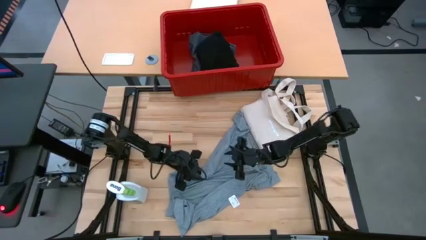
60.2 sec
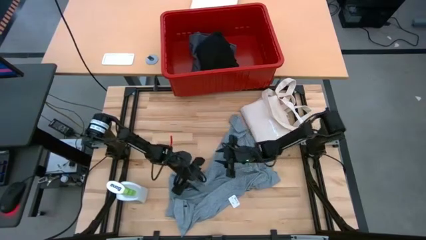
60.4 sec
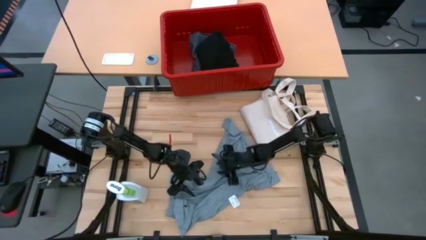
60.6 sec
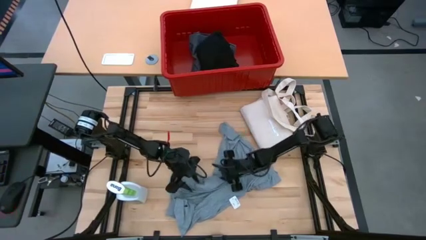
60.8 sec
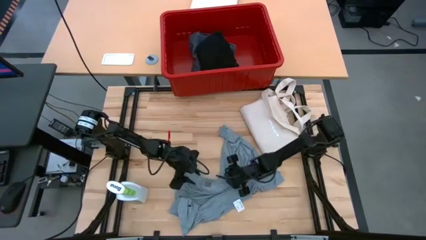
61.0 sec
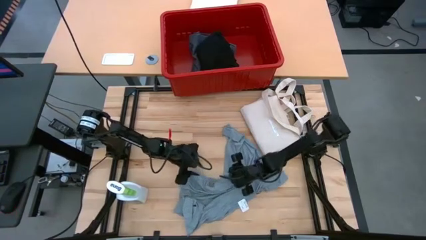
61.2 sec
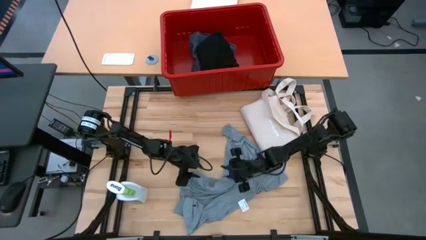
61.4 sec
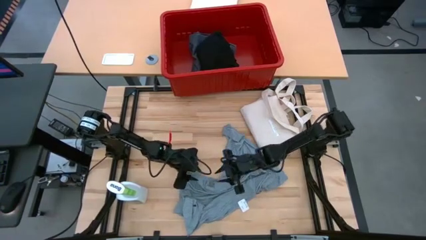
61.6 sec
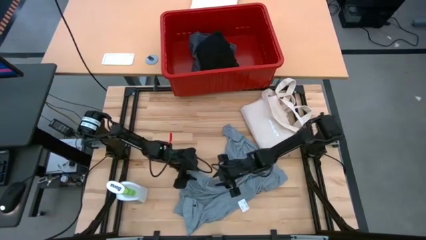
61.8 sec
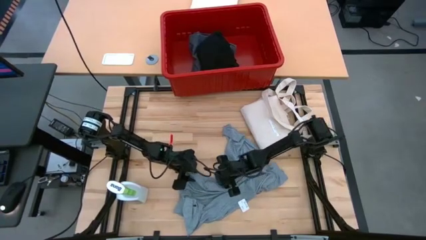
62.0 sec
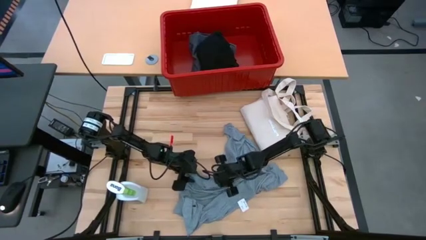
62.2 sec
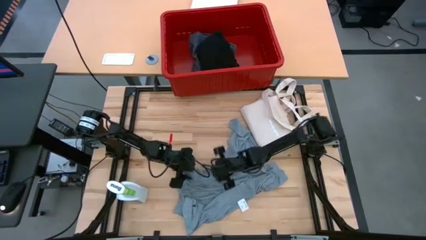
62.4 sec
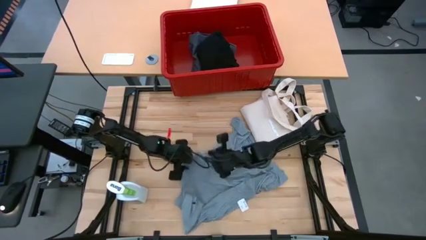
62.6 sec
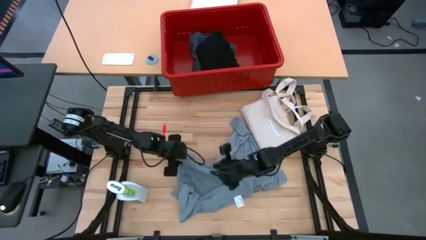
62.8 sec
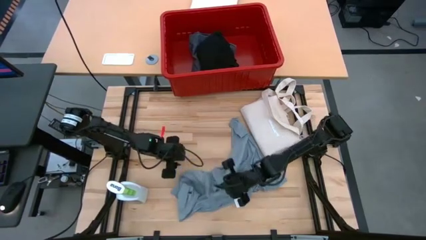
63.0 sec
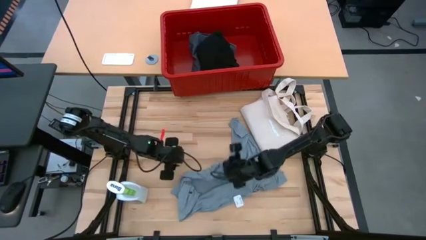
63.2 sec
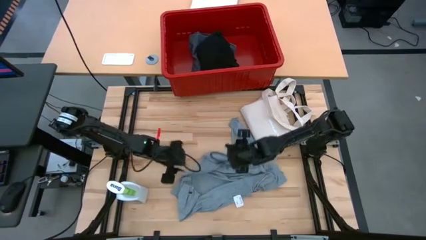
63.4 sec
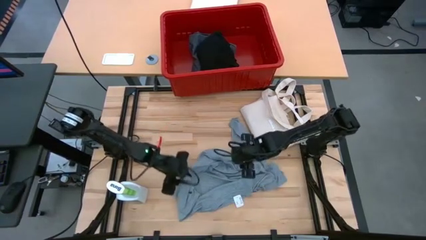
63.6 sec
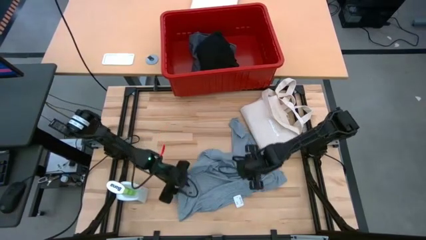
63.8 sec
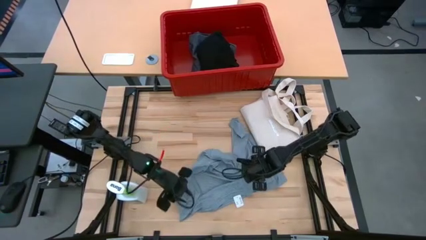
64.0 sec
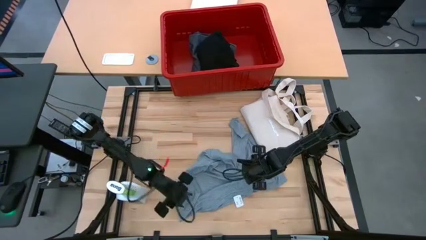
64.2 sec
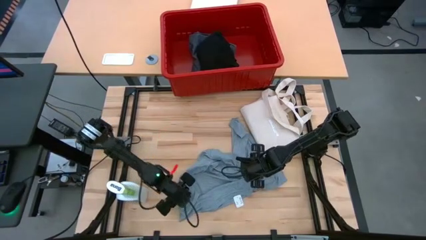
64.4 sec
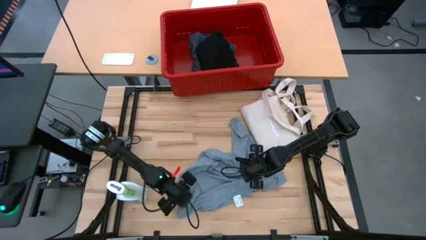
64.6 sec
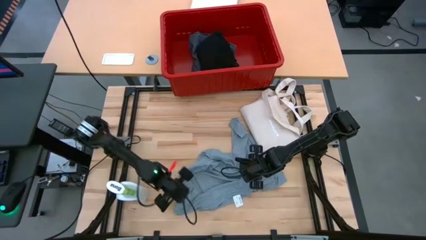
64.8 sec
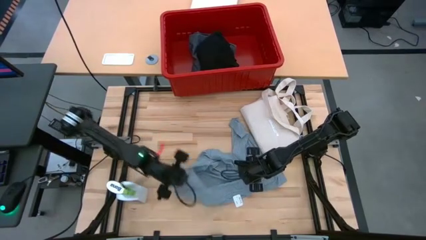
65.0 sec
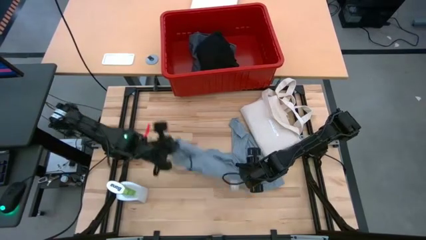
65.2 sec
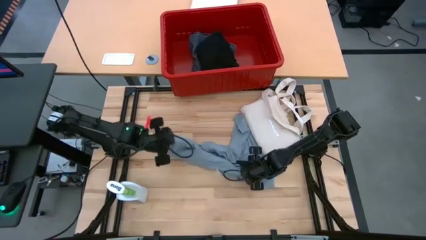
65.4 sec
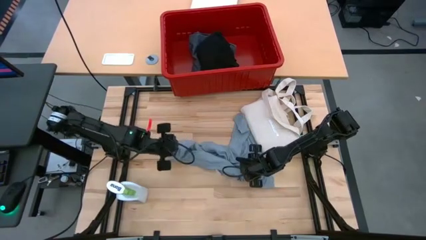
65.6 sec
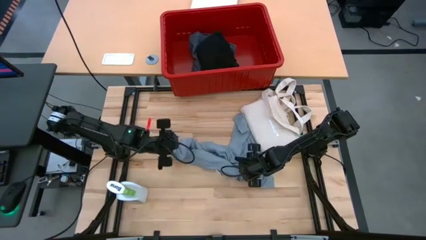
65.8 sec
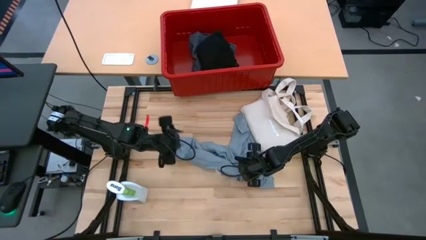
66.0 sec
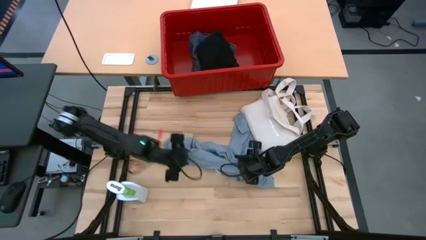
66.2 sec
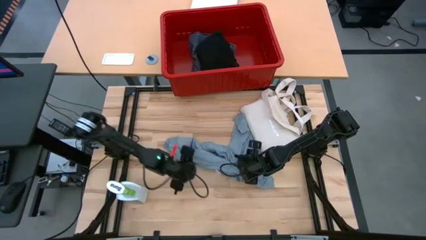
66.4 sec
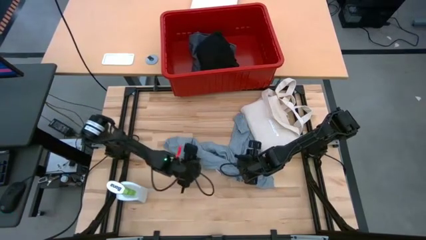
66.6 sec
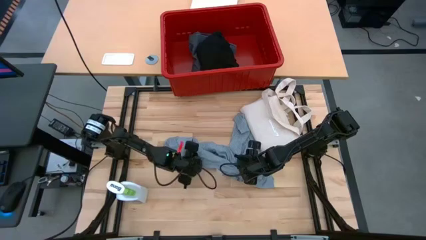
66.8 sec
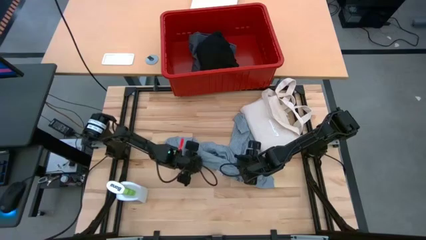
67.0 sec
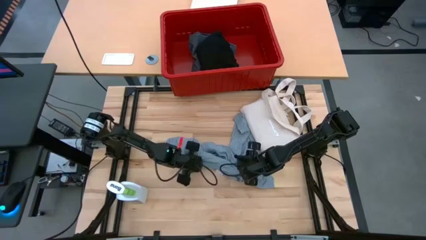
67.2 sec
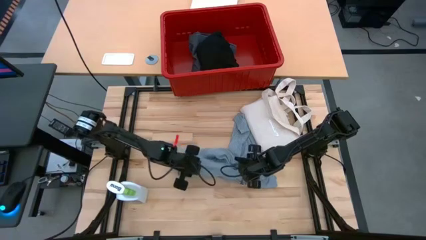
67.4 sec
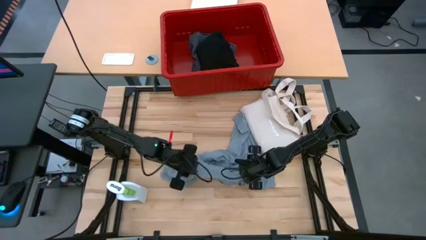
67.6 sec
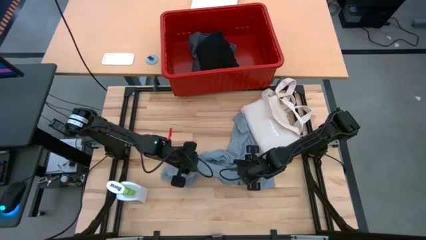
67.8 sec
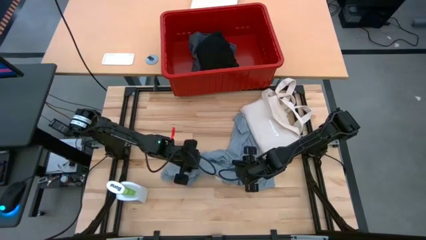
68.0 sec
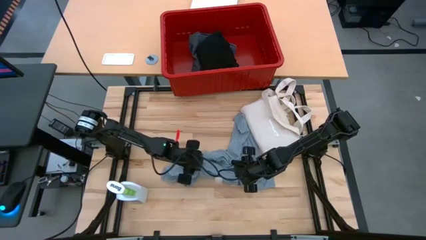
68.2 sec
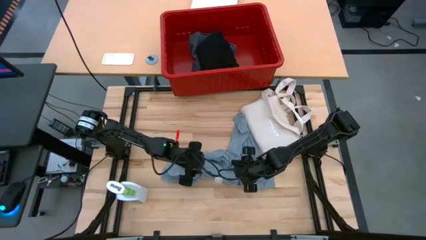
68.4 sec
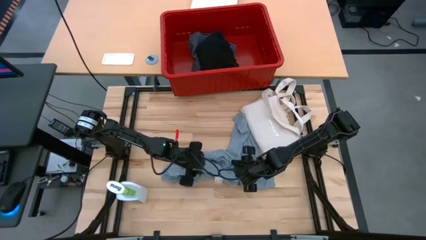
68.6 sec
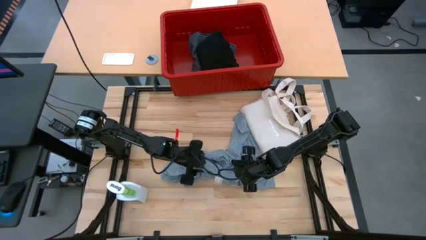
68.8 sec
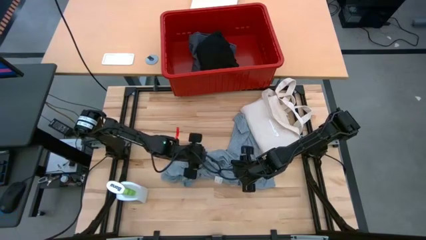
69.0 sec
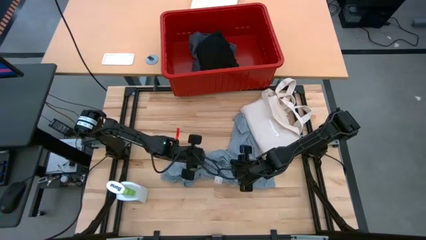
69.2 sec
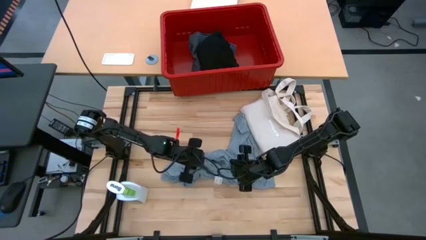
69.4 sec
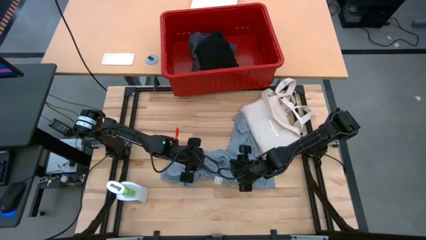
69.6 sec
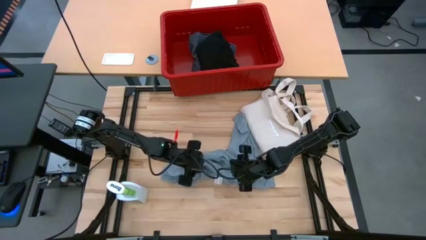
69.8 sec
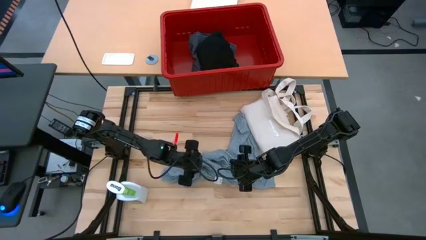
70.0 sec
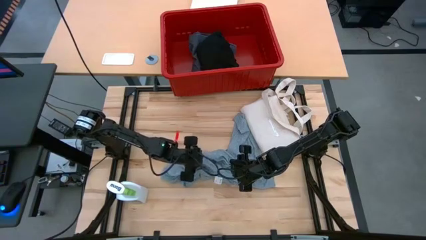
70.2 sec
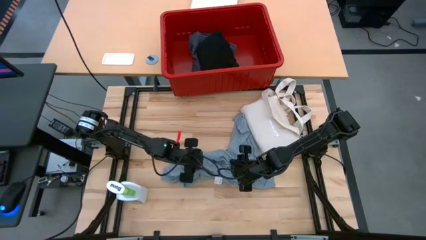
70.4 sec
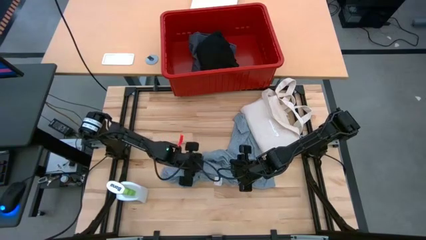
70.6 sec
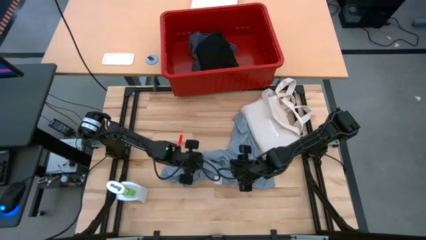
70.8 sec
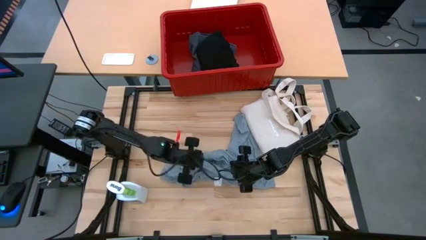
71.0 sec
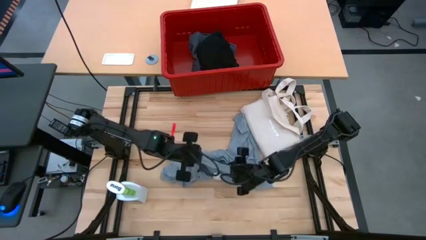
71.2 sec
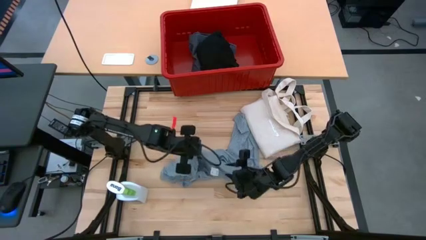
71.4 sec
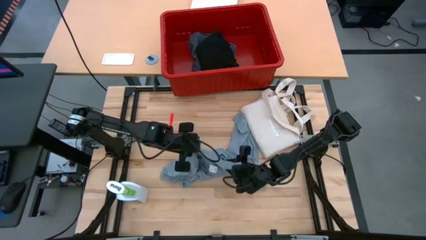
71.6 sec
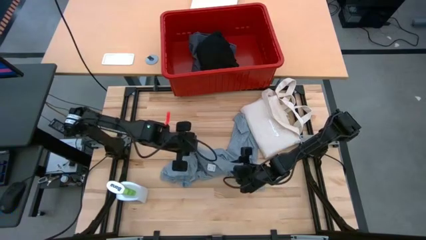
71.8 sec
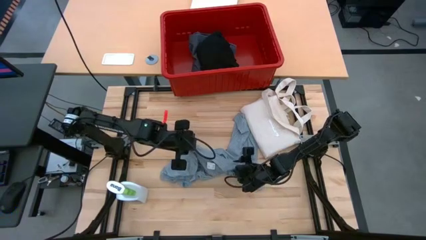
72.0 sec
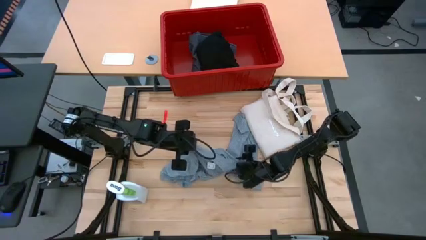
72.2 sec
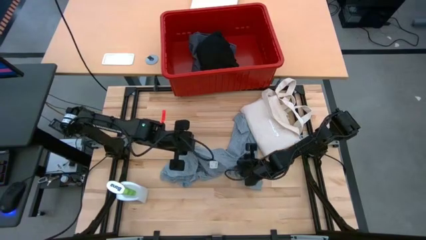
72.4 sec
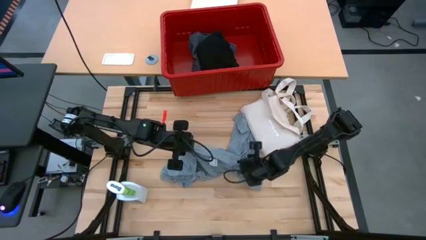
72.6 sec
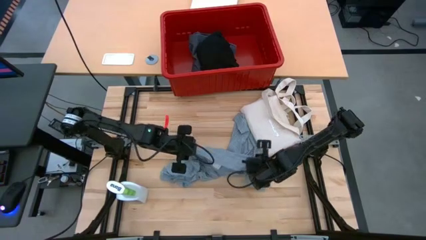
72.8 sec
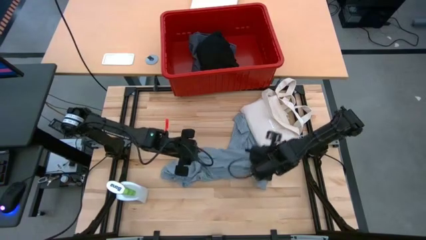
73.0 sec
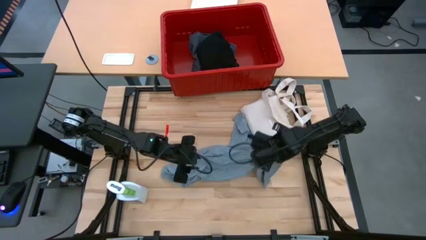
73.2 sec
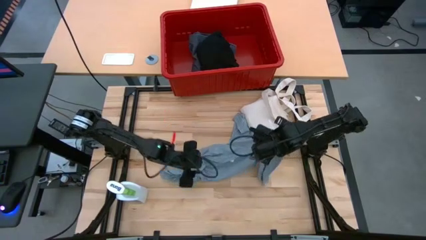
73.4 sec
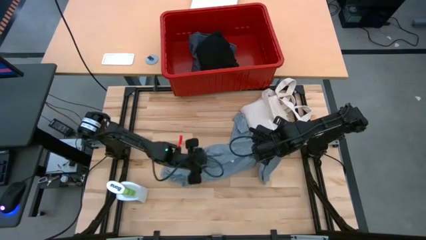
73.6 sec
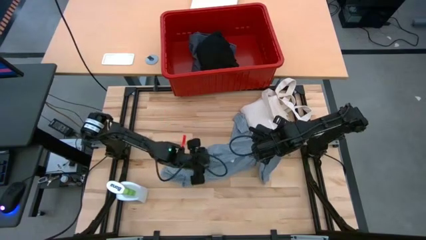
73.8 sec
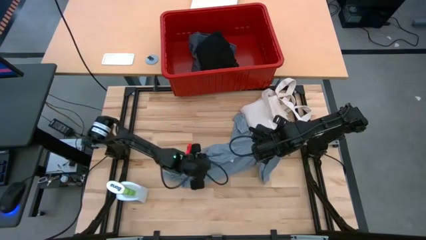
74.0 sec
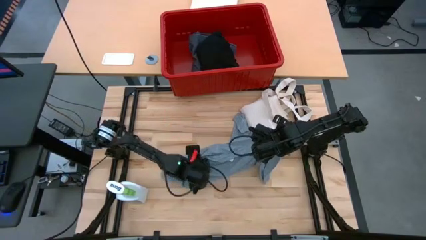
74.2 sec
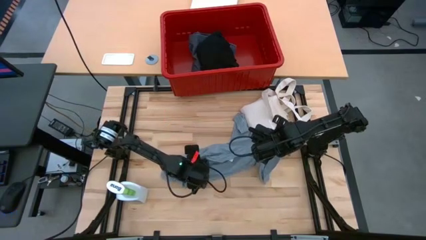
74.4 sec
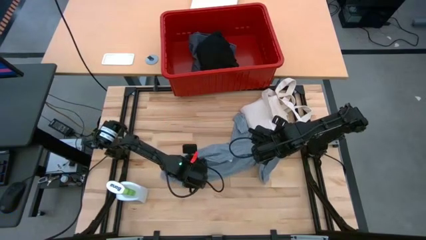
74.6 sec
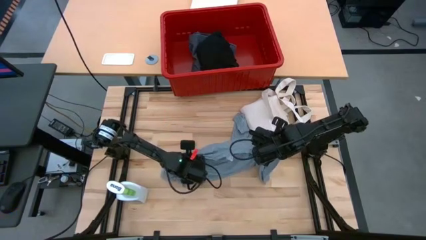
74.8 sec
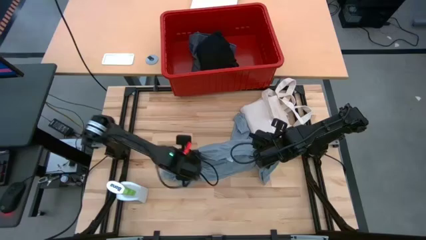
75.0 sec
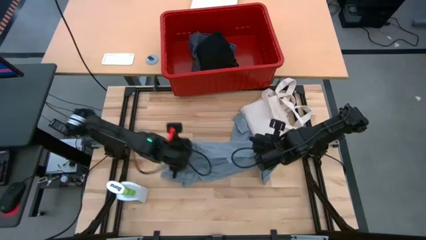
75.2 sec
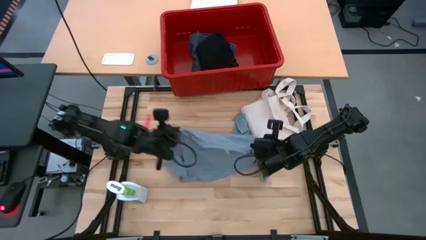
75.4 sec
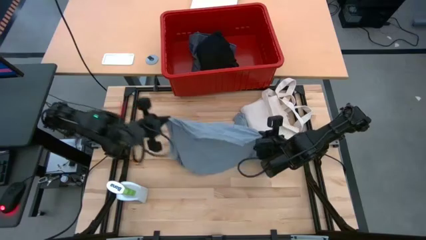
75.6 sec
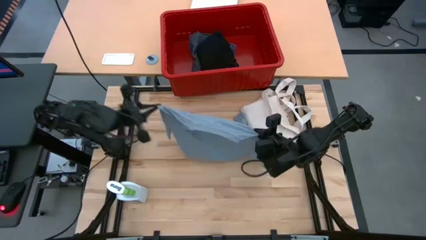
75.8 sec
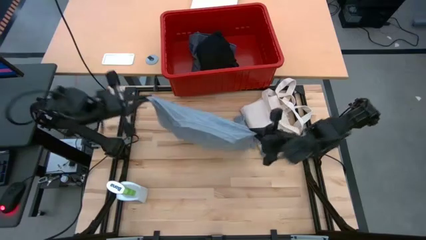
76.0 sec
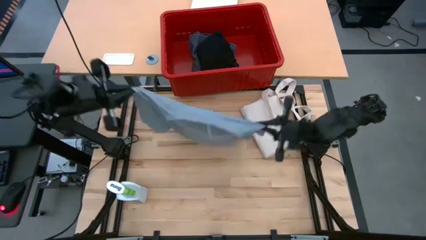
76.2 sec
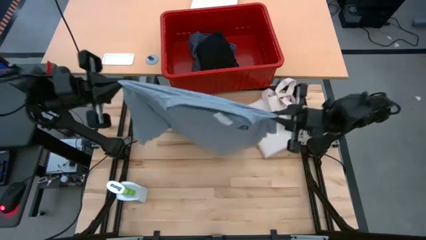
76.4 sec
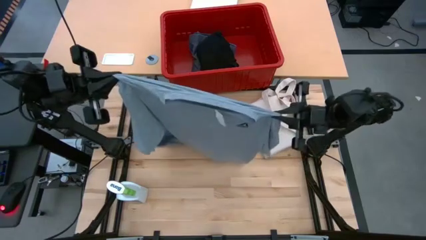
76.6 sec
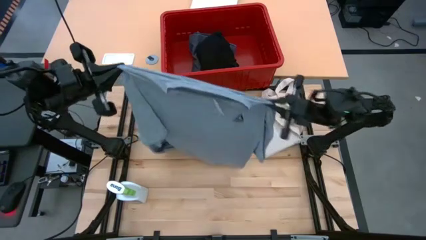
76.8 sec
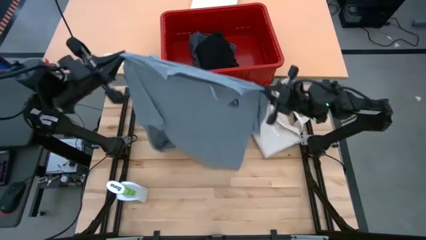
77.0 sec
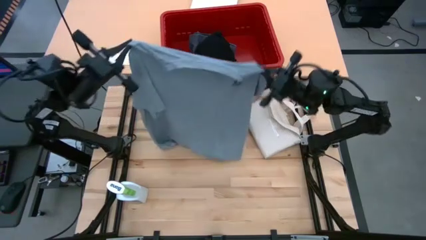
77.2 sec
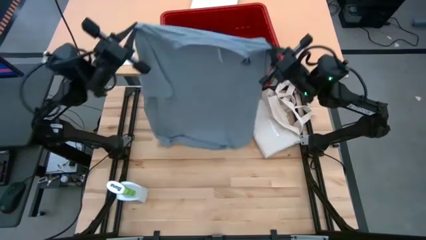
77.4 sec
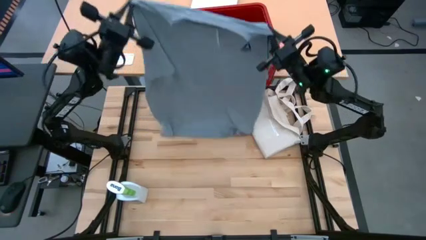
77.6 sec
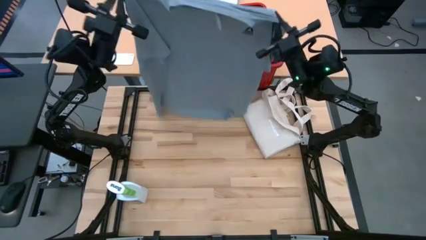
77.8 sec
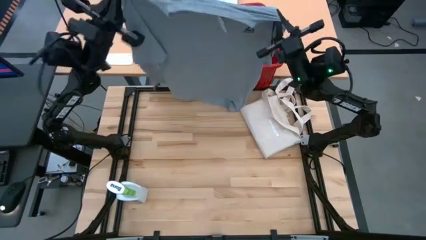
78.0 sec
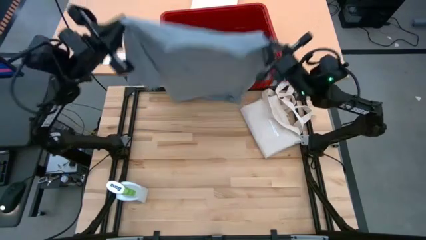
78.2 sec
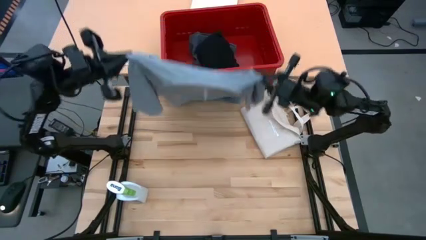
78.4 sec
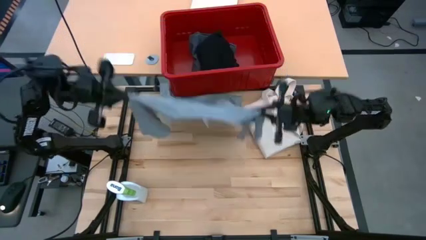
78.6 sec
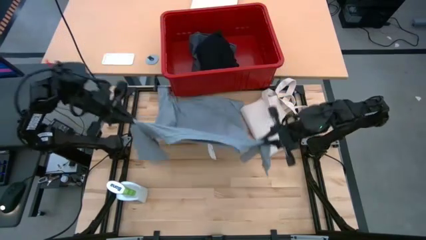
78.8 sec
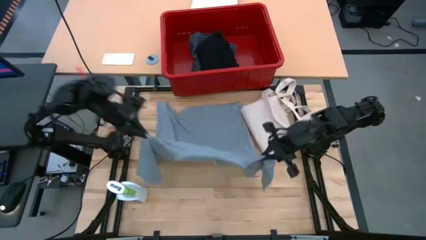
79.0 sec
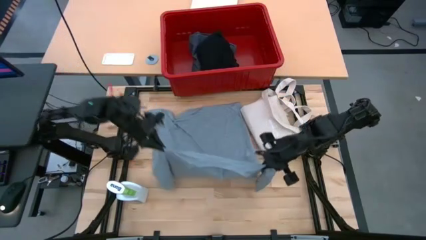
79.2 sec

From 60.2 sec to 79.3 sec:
Task: Fold Laundry from Bin
Fold the gray shirt
